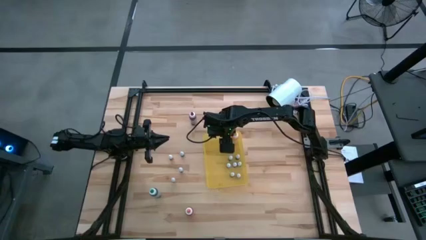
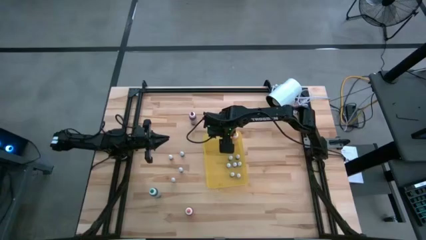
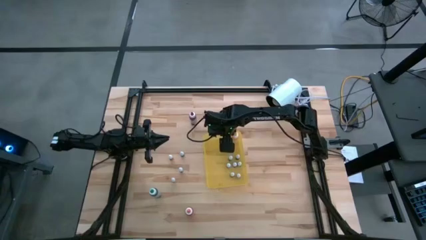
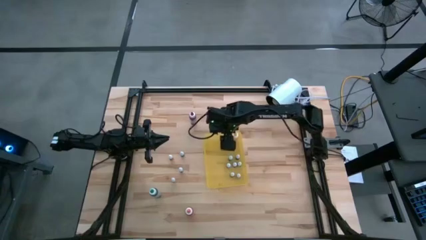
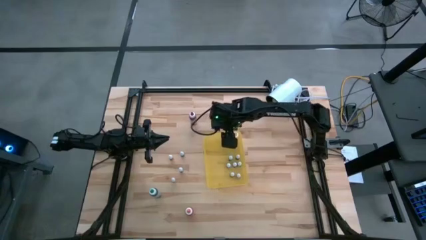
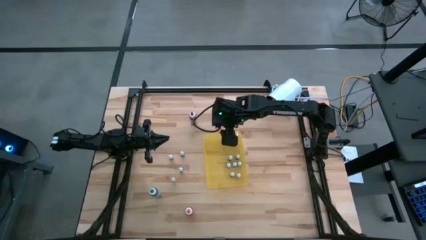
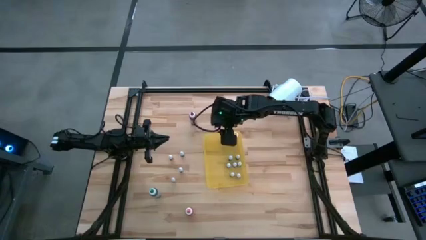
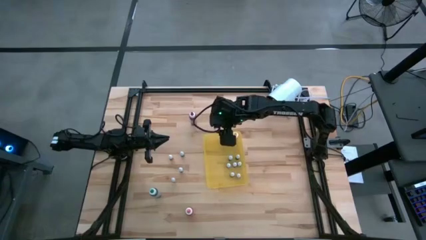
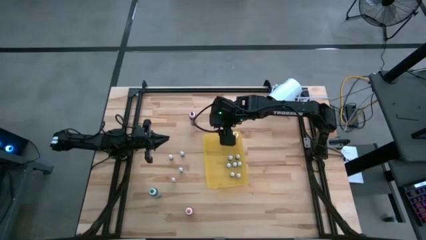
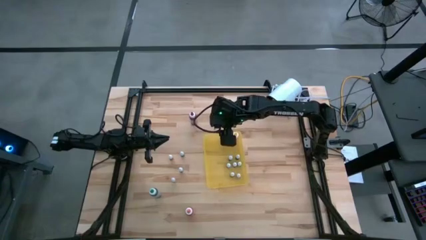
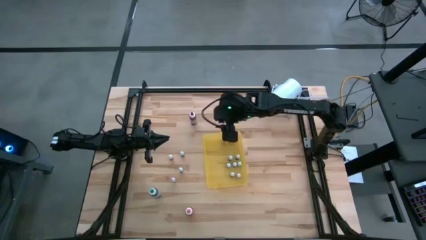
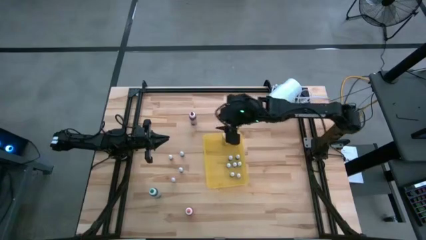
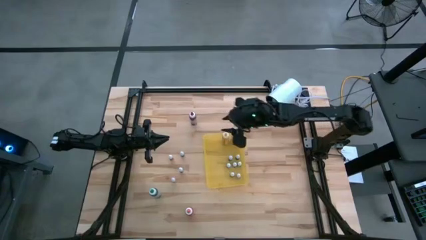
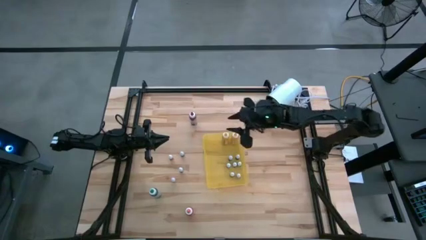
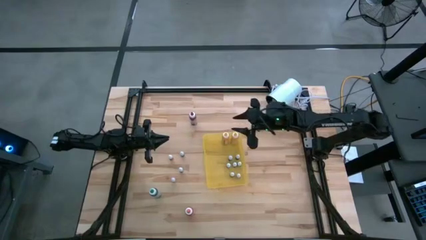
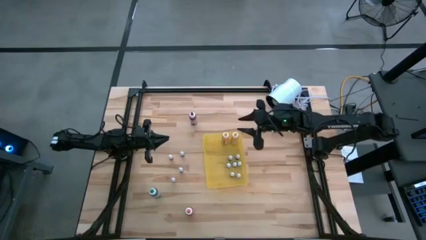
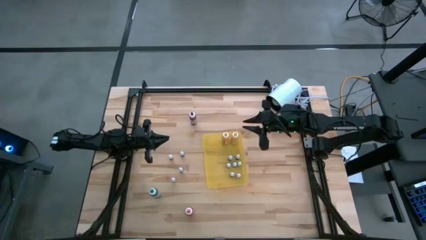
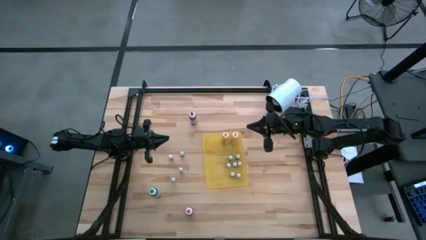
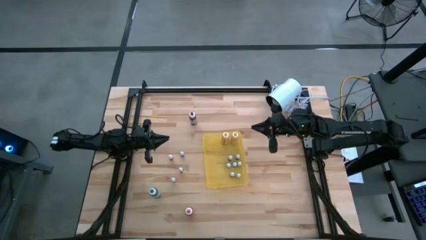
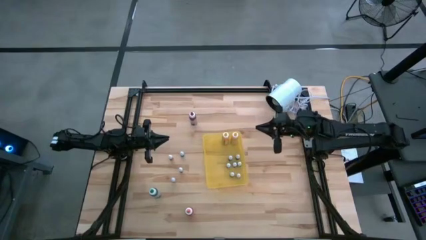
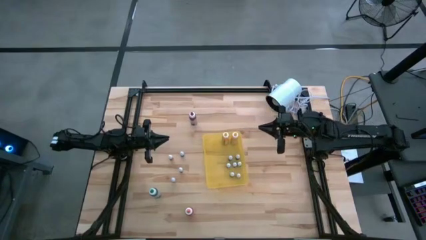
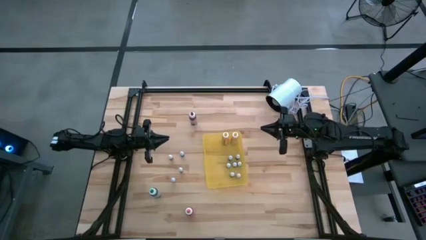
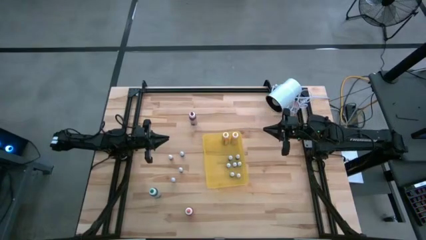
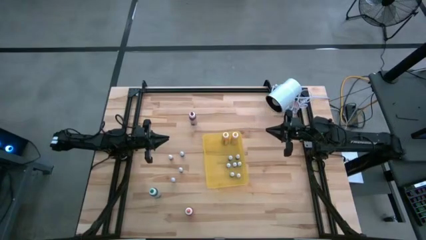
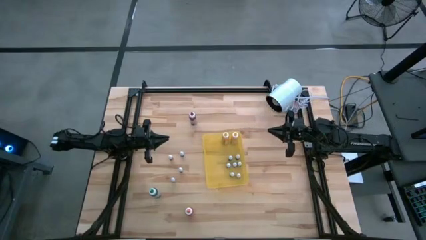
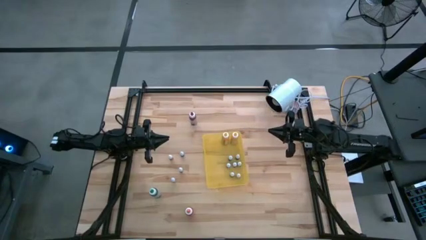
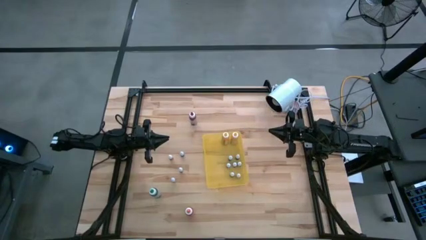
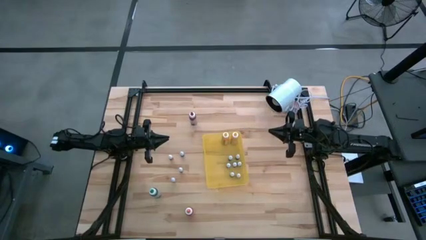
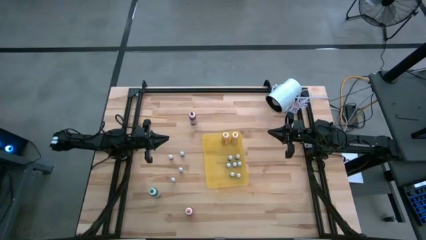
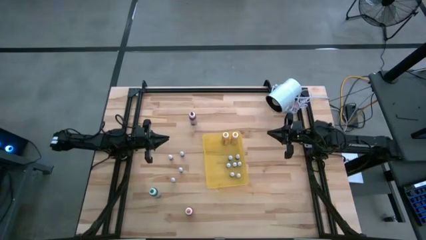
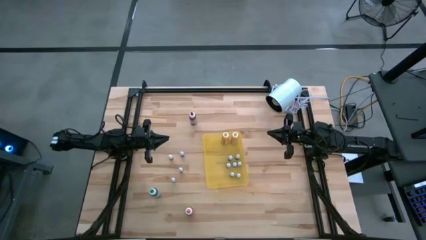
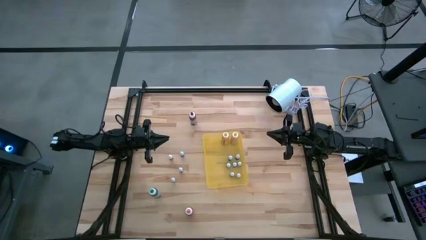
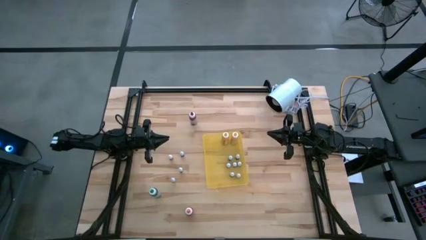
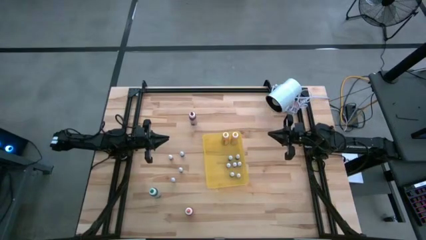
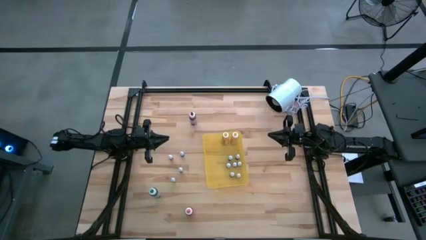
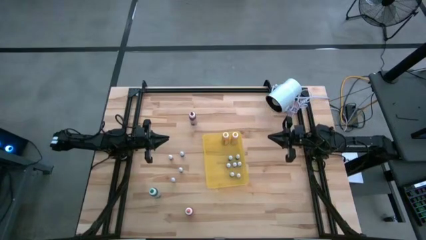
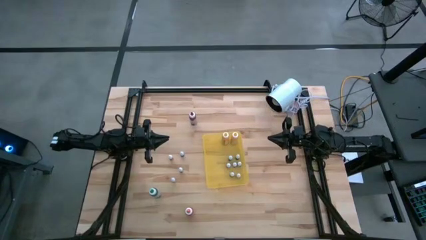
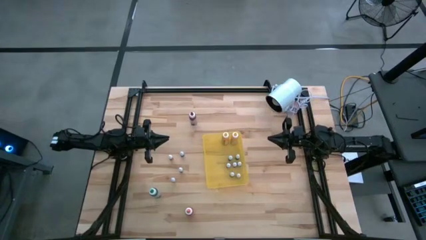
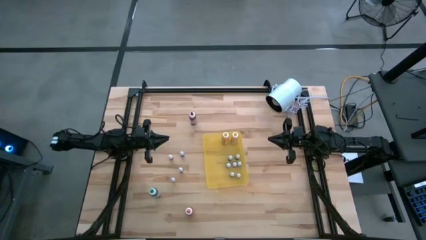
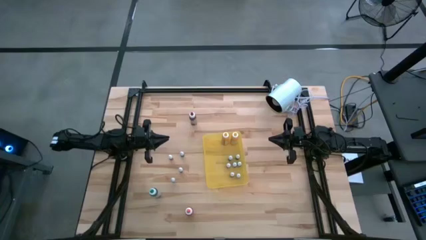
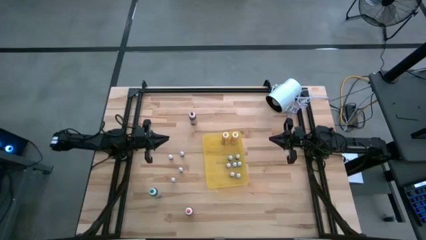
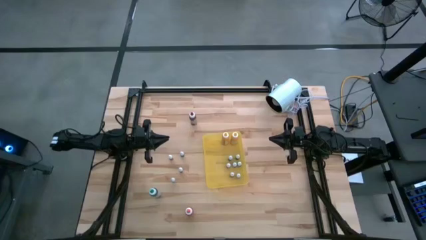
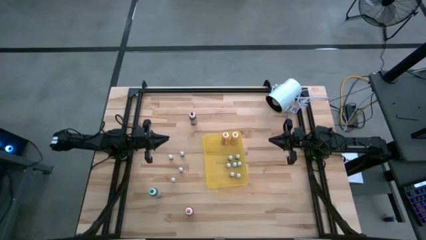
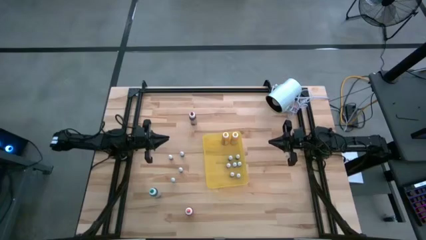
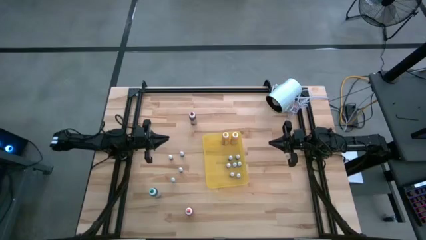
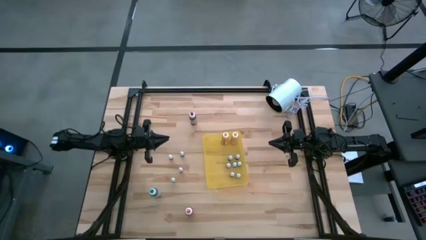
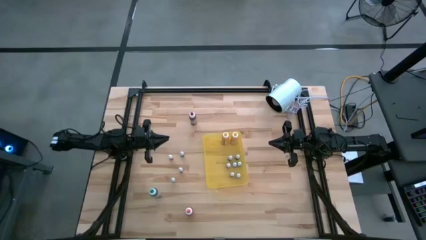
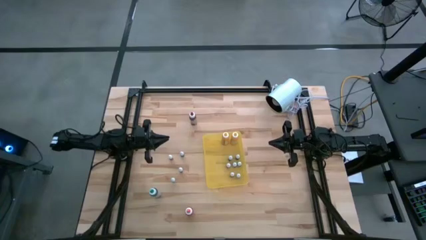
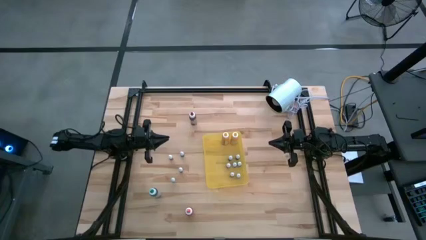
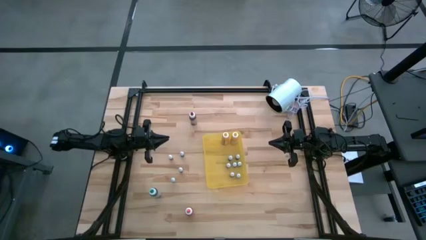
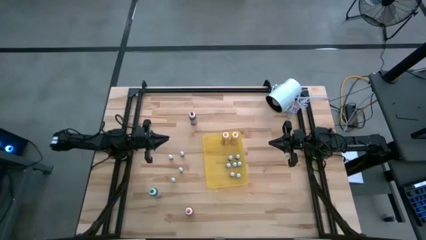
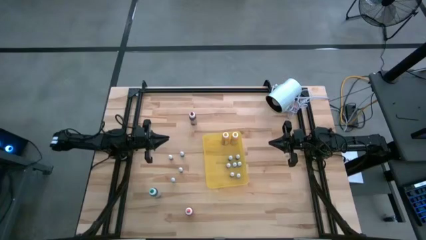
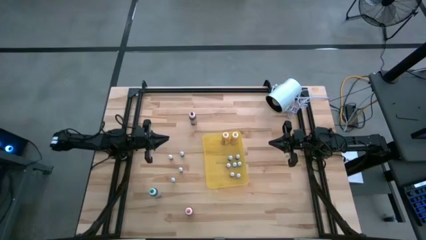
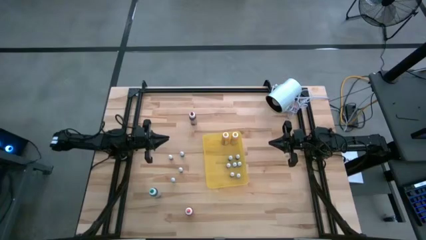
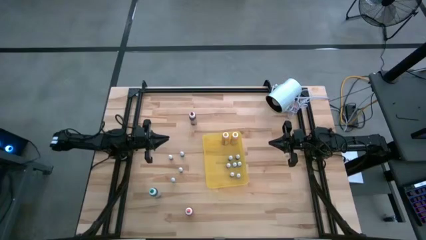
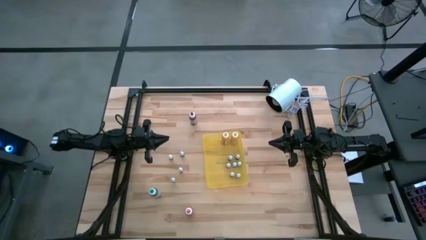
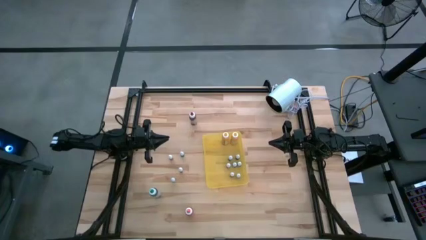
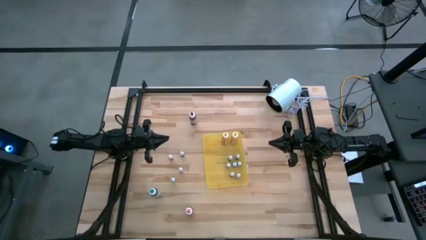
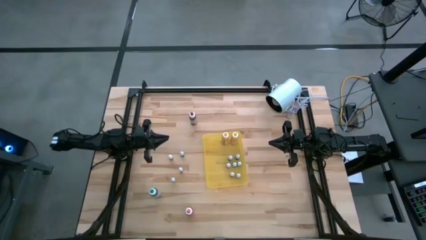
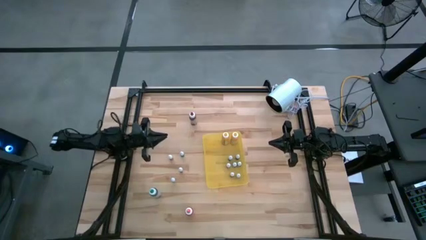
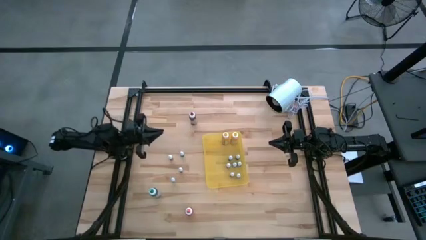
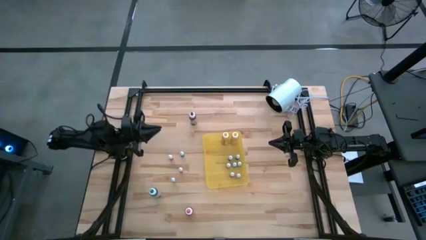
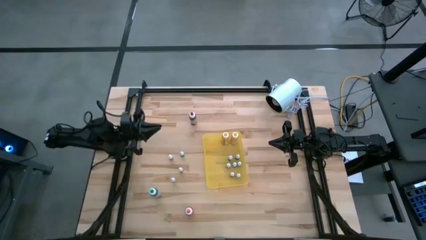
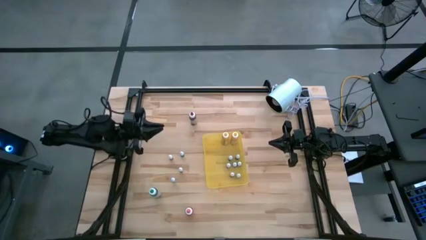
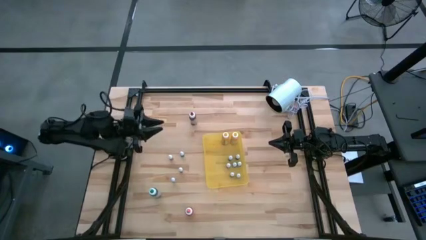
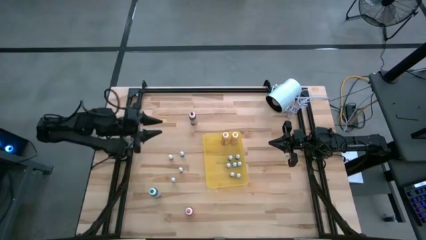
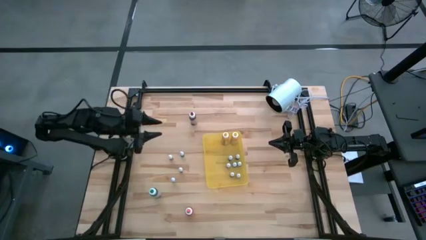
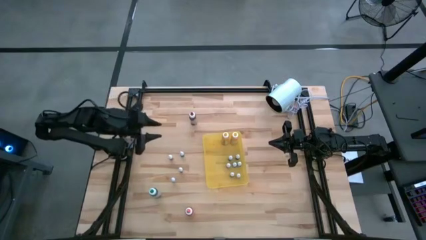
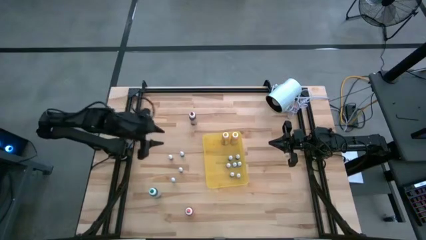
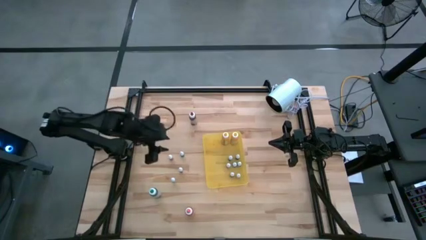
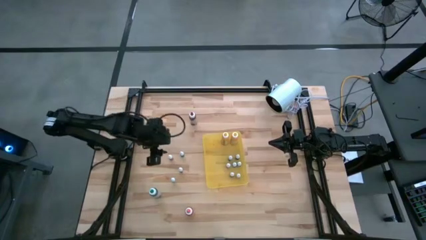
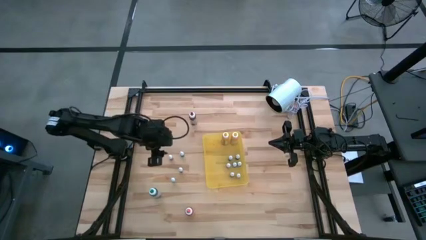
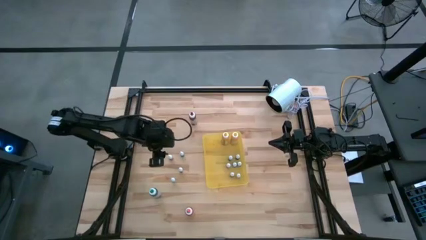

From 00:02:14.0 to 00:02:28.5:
Task: Pick & Place food coloring
Put the small orange food coloring bottle into the yellow bin
